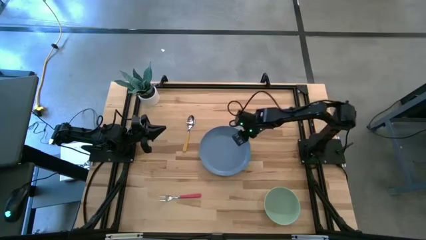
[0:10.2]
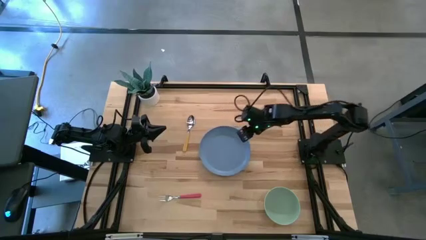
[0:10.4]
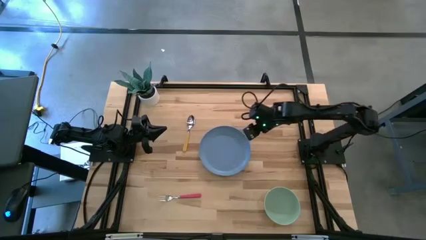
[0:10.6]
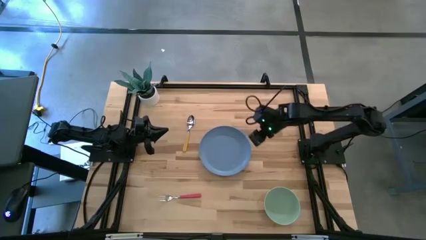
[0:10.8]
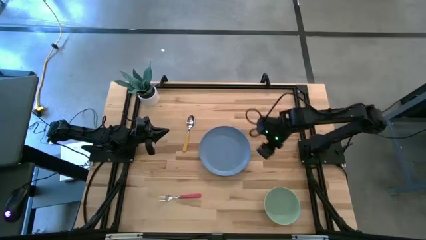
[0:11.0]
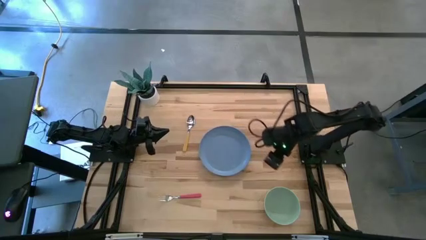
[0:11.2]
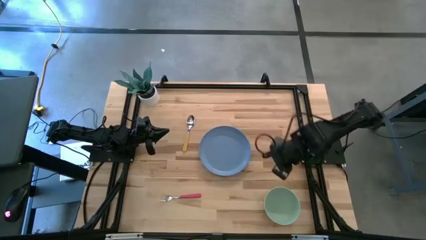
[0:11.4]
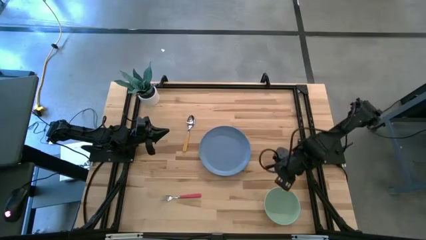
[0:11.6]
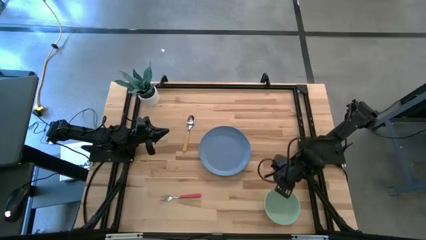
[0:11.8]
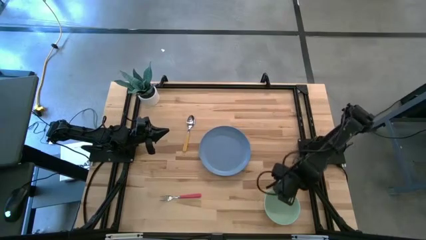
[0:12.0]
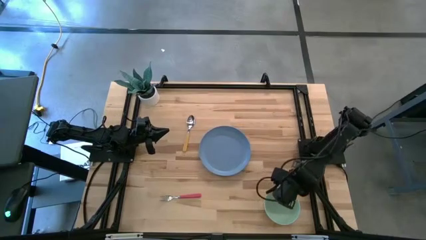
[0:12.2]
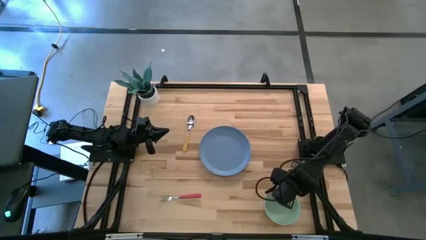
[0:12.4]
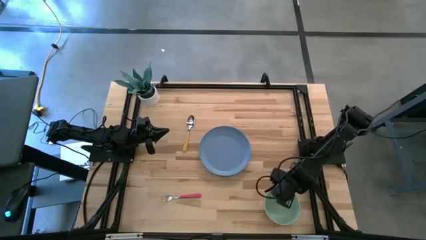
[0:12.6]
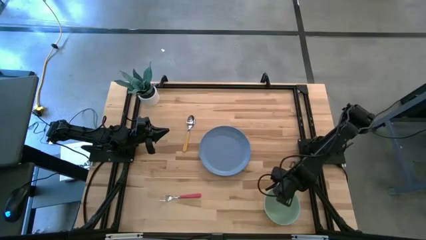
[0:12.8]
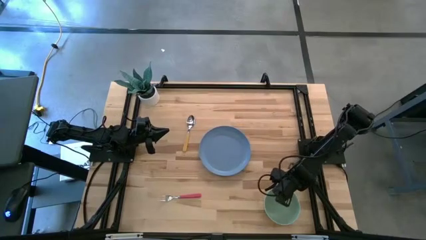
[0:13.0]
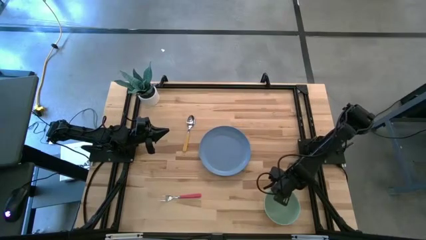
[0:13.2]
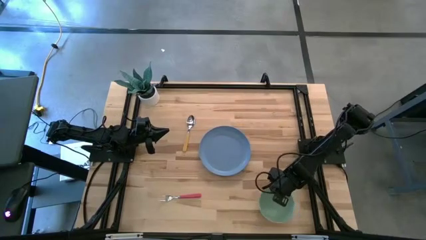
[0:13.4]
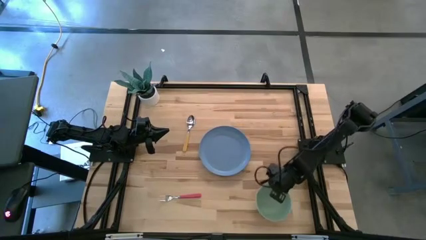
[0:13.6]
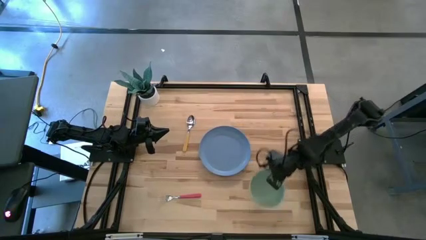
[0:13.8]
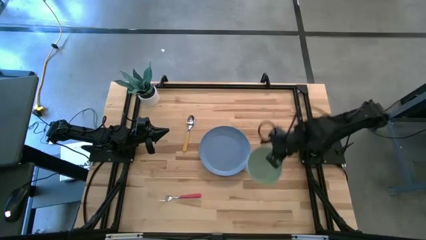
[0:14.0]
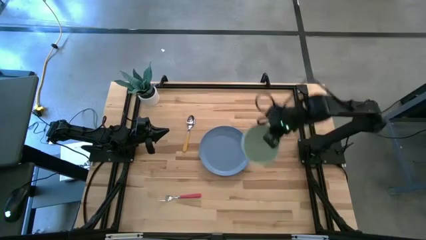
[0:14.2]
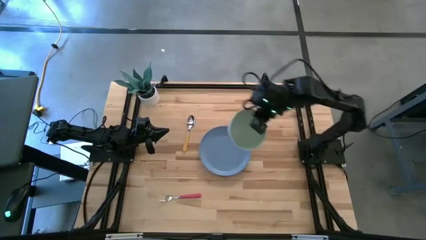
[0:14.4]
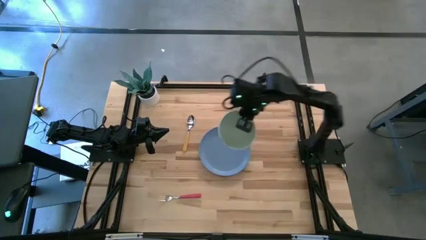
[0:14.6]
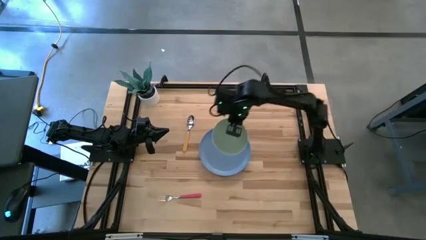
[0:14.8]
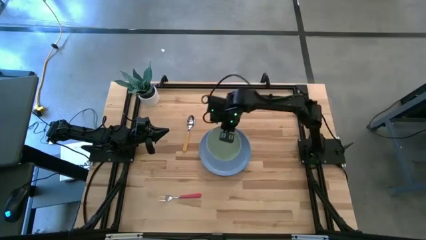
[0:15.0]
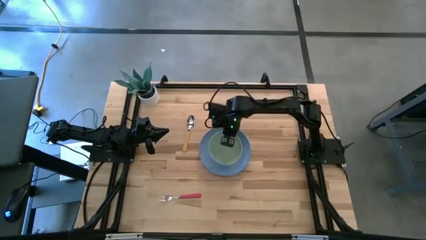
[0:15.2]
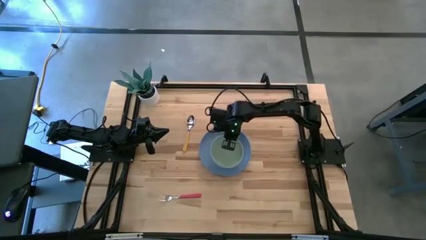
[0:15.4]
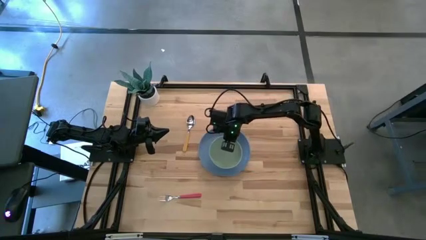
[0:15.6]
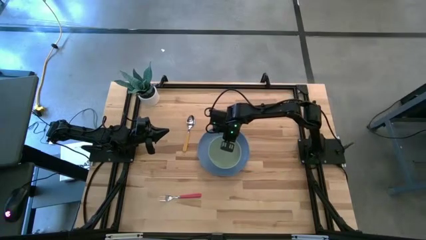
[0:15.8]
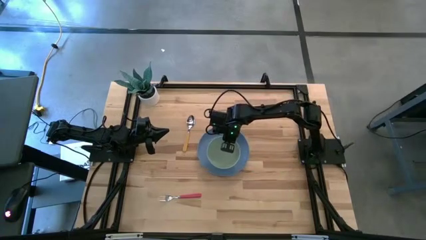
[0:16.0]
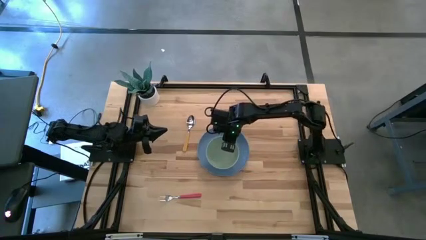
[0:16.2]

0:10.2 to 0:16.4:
Task: Set table place
Put the green bowl on the blue plate

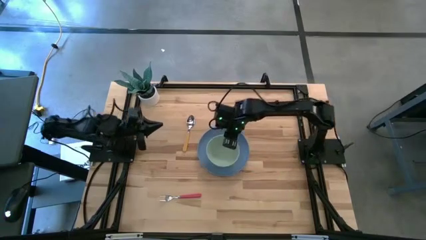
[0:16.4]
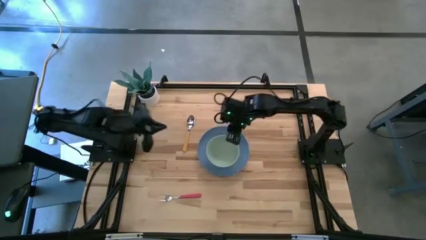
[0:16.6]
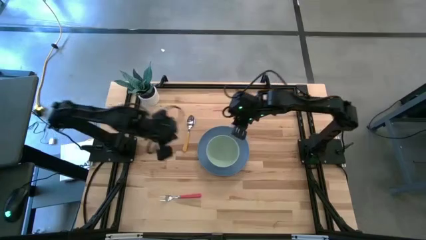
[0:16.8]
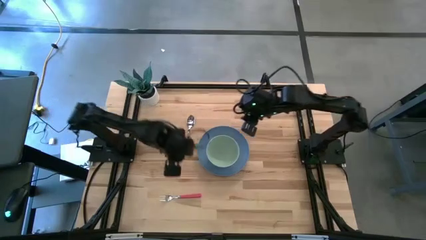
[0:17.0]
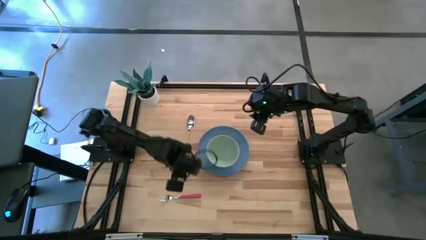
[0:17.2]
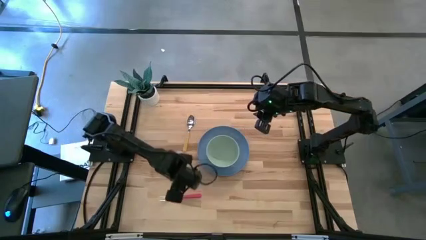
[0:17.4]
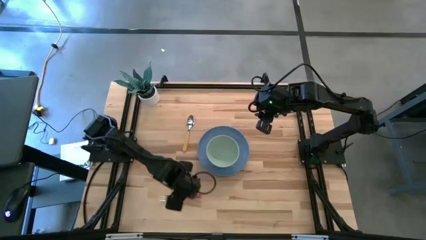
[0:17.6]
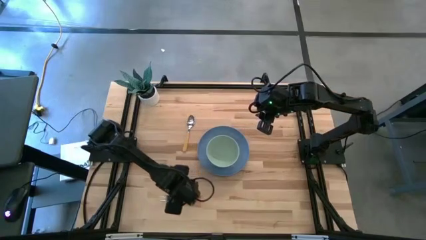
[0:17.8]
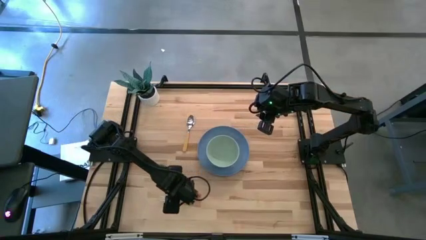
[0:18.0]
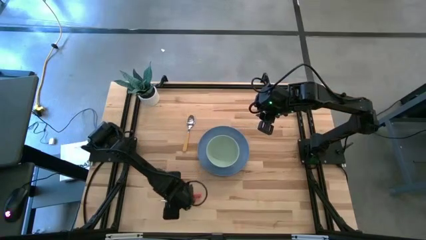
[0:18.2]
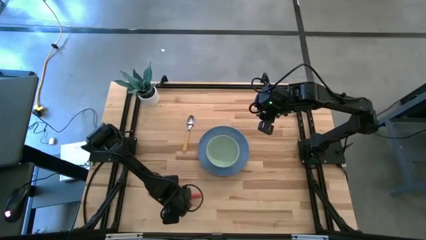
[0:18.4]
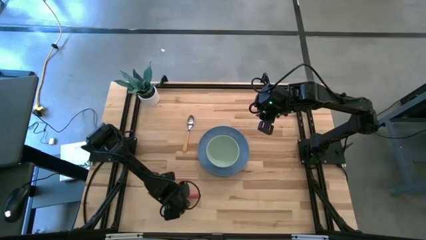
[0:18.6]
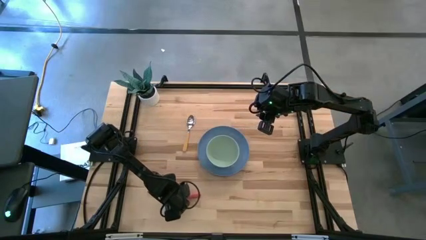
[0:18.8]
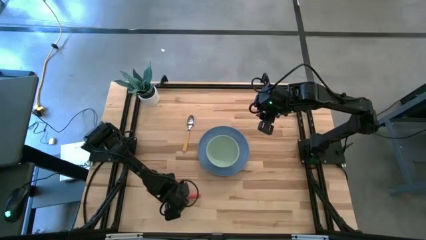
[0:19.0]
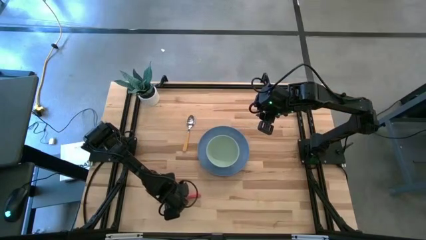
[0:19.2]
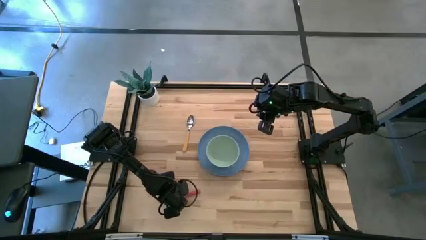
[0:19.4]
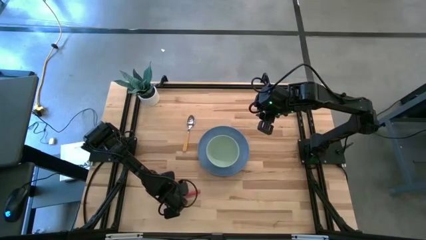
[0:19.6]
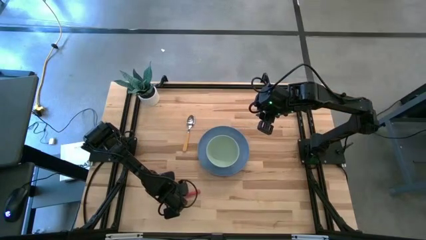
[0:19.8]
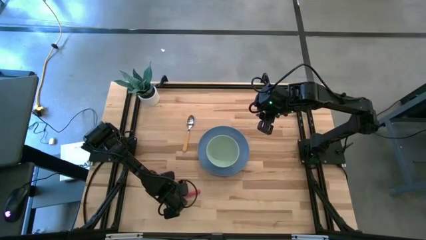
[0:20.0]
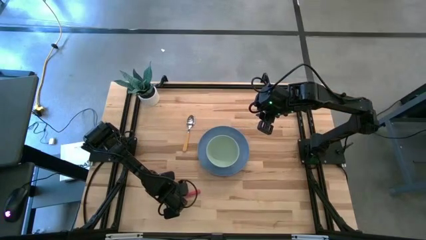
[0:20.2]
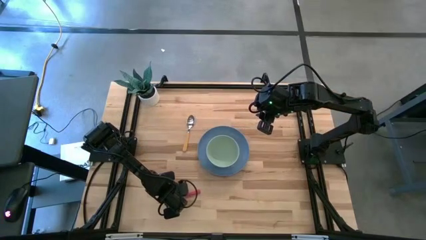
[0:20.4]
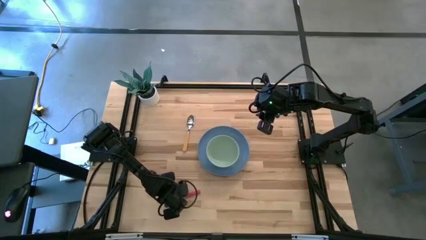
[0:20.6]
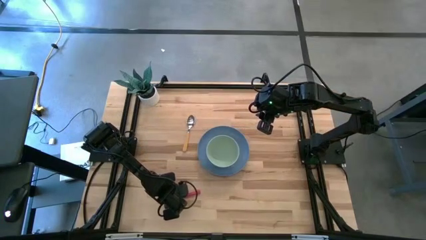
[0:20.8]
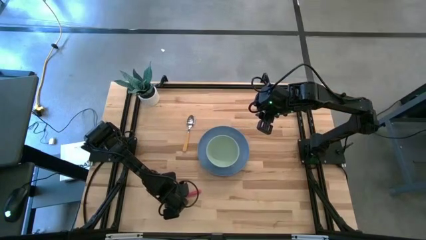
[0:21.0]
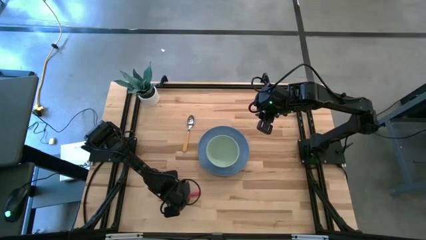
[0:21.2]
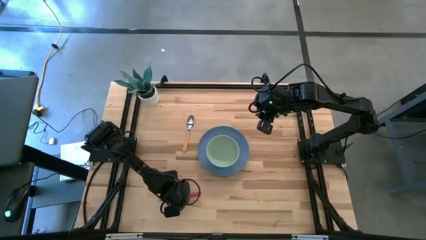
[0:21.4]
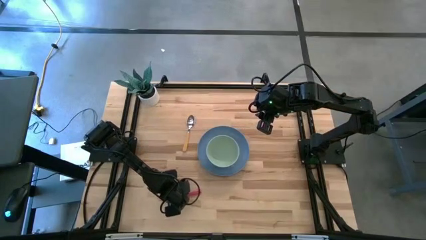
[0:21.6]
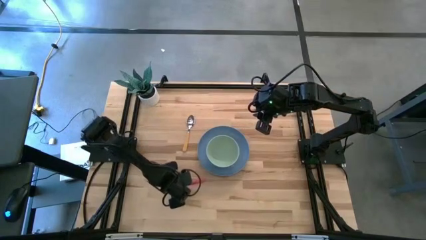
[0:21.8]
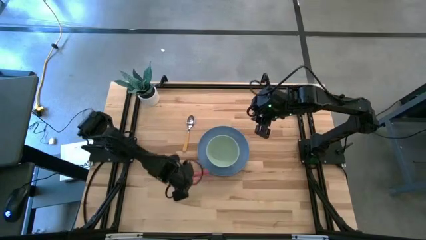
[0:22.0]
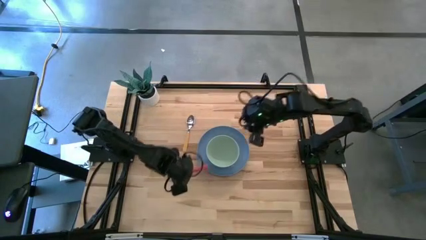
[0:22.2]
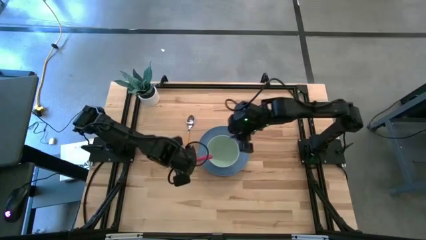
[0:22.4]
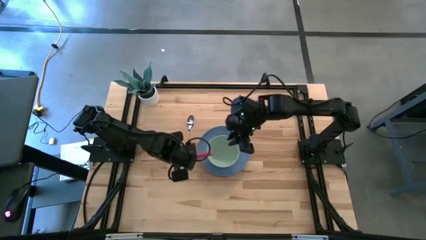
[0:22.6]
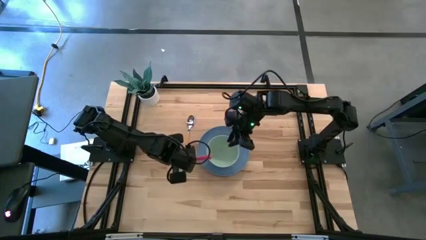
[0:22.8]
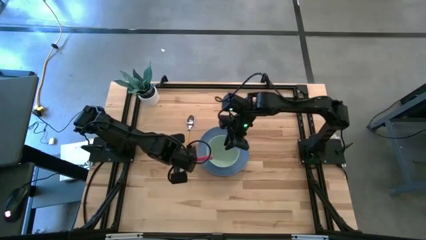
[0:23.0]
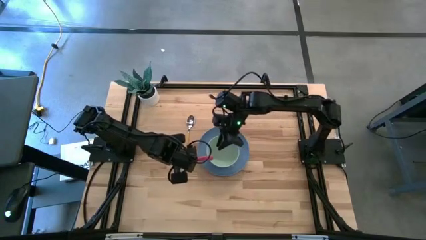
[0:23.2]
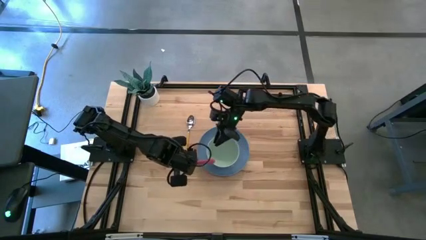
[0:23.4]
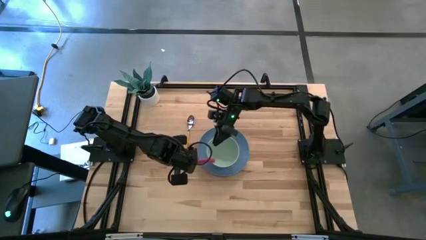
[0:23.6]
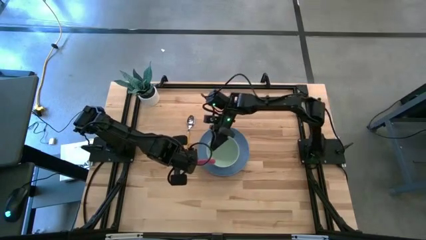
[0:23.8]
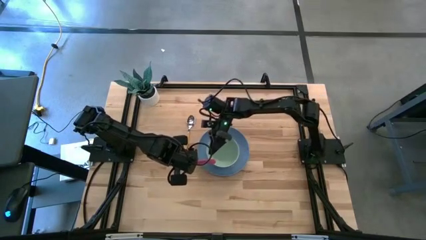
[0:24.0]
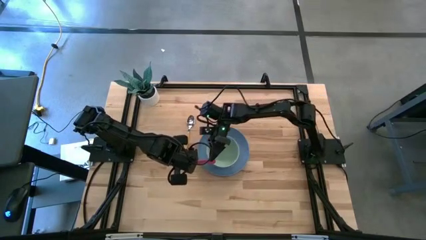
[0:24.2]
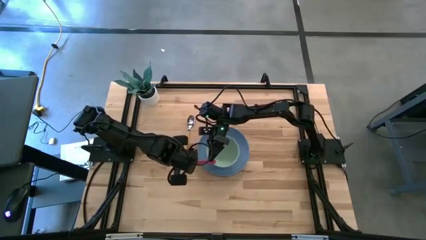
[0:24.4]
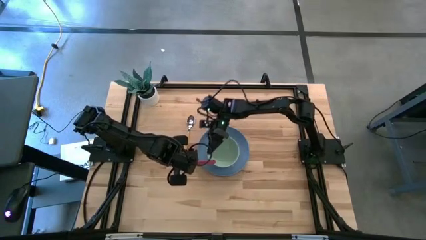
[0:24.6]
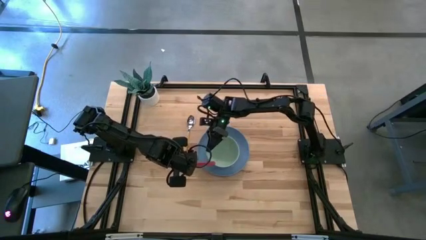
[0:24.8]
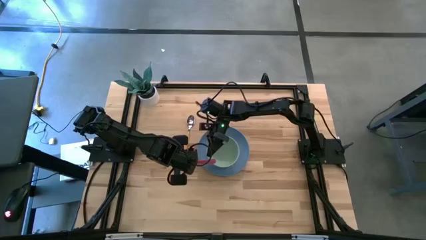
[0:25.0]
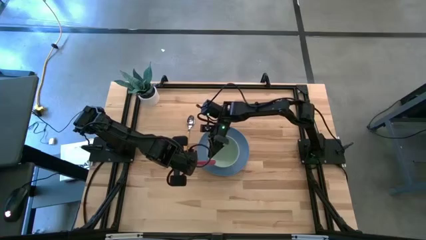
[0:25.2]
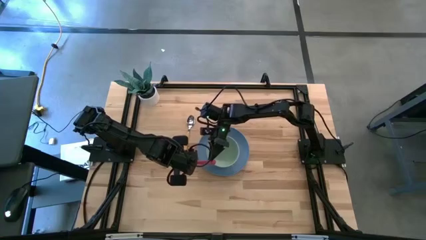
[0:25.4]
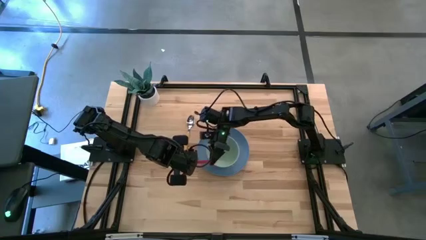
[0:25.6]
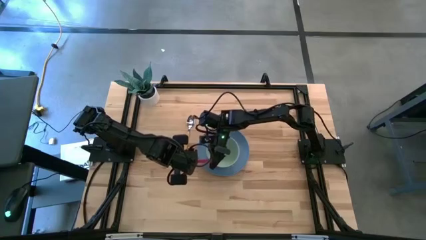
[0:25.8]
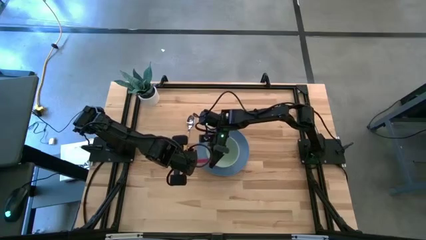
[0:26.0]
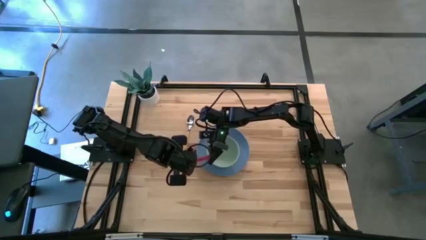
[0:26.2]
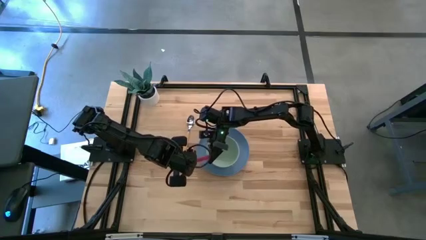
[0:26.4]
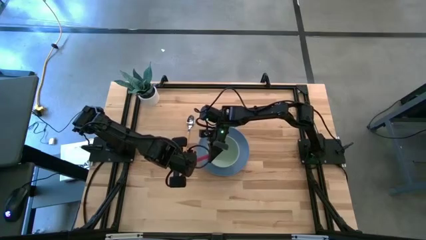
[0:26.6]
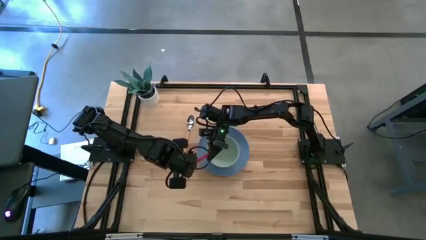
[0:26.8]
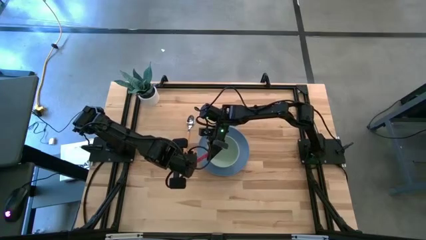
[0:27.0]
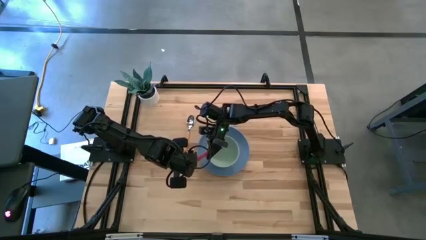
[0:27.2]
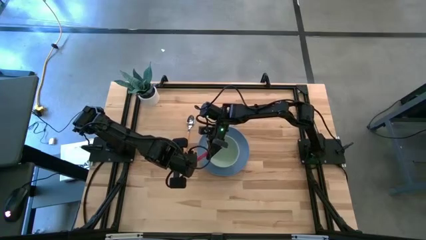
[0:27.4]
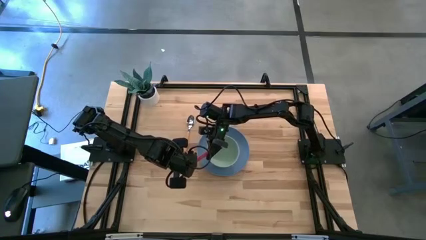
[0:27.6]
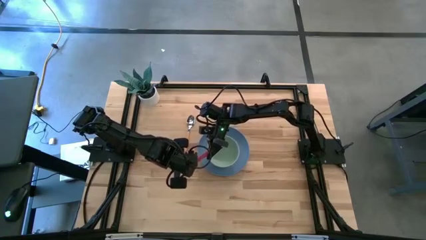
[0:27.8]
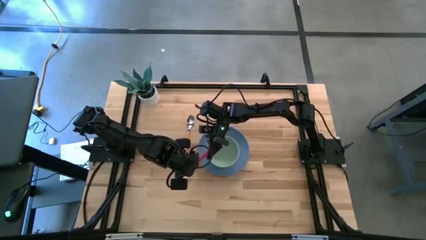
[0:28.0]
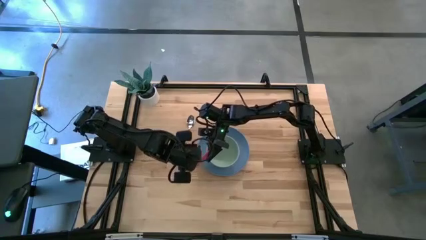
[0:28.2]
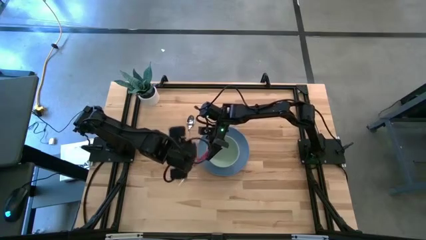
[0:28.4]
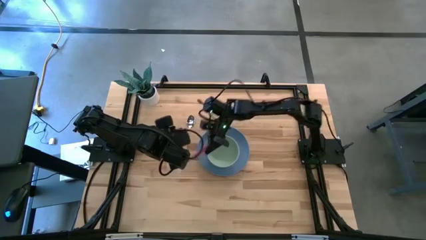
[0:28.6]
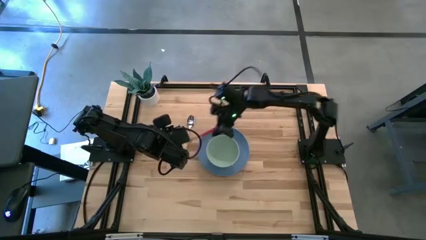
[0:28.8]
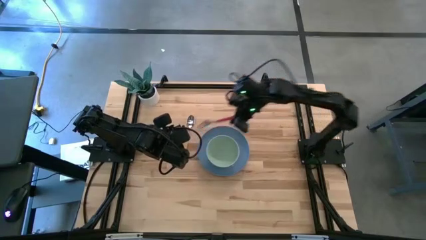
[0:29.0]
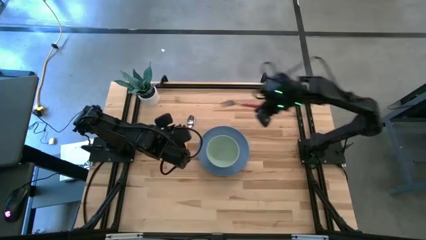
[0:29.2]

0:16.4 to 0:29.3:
Put the pink fork to the right of the blue plate
